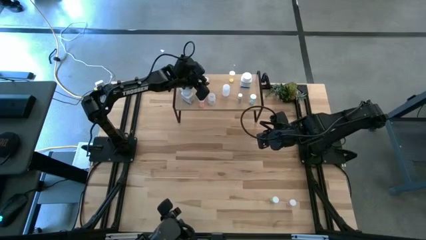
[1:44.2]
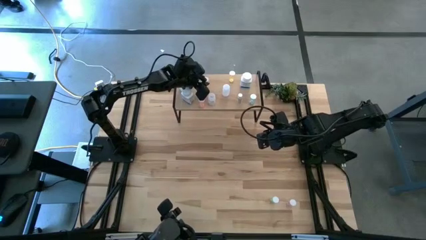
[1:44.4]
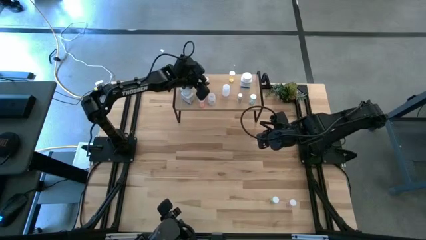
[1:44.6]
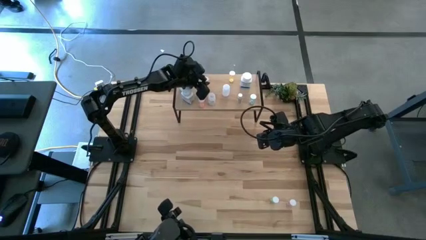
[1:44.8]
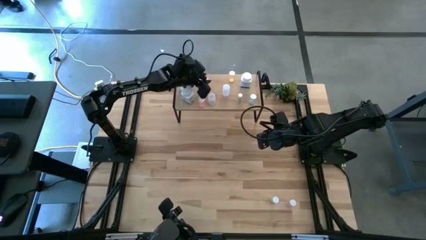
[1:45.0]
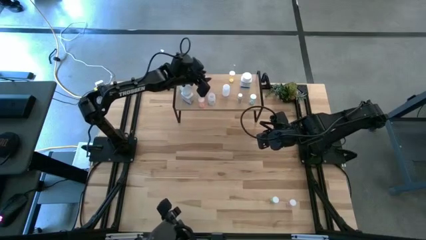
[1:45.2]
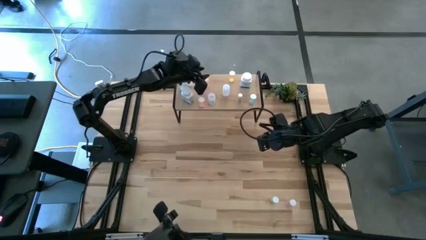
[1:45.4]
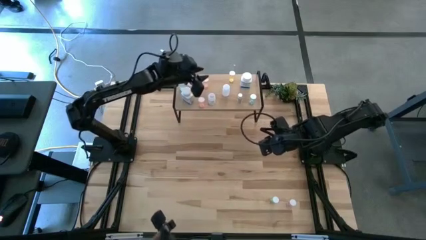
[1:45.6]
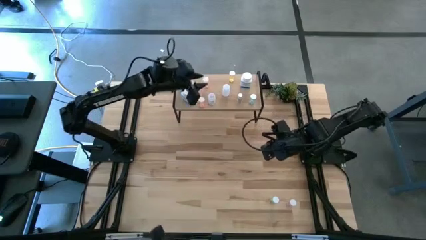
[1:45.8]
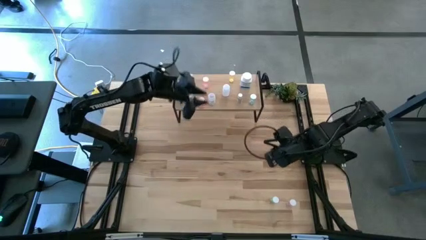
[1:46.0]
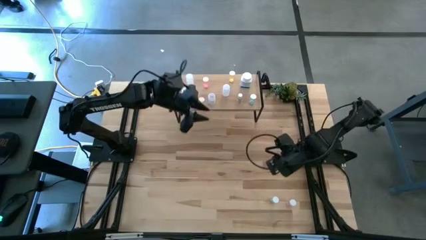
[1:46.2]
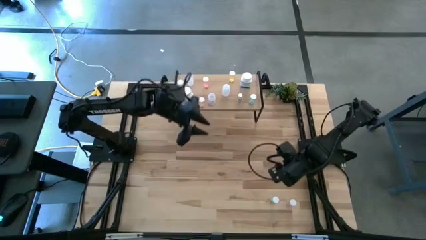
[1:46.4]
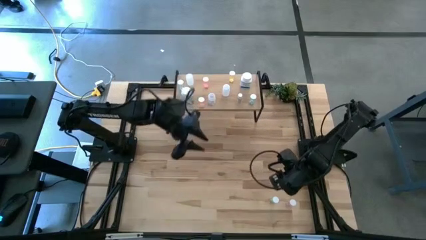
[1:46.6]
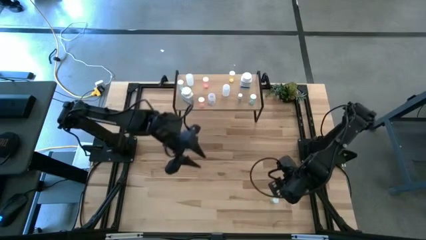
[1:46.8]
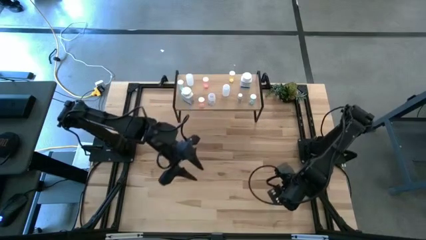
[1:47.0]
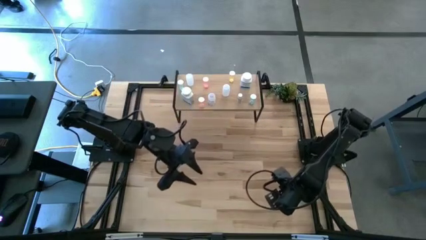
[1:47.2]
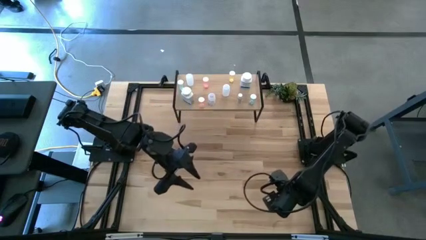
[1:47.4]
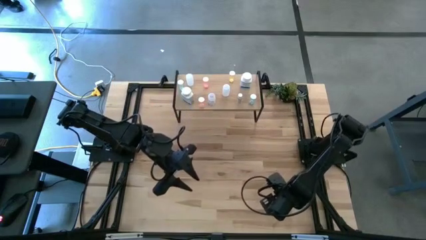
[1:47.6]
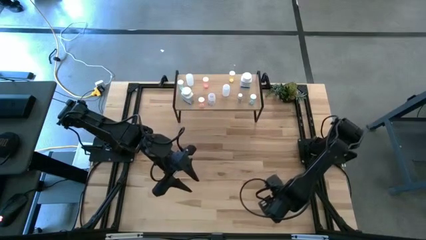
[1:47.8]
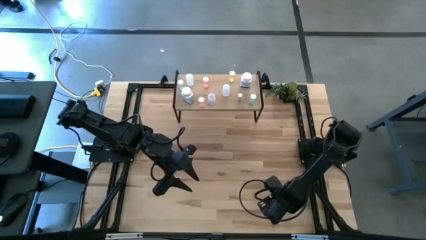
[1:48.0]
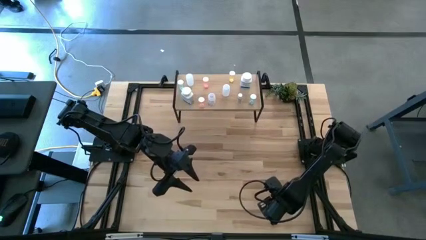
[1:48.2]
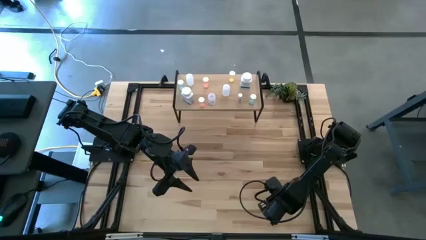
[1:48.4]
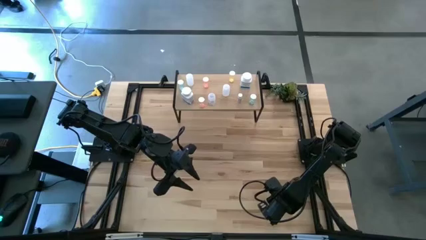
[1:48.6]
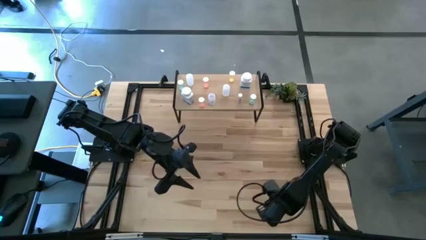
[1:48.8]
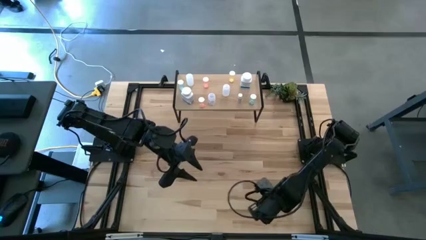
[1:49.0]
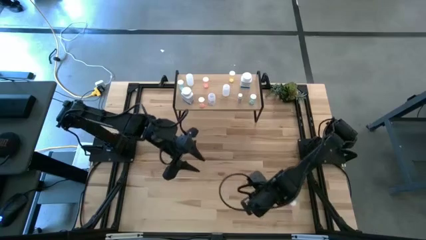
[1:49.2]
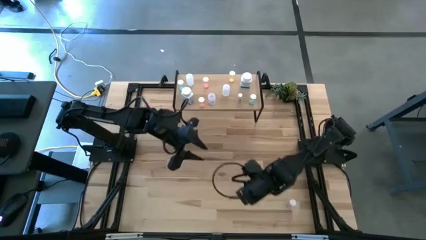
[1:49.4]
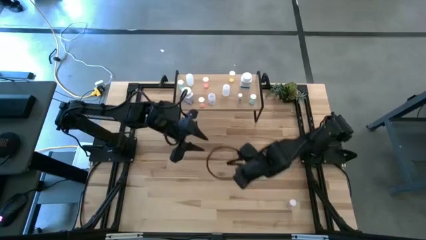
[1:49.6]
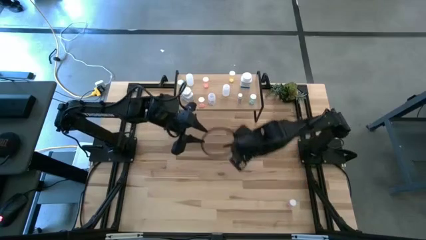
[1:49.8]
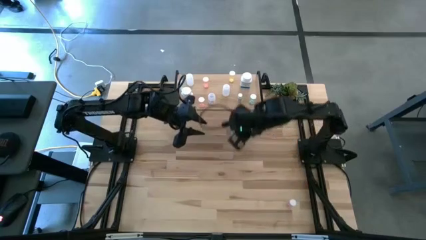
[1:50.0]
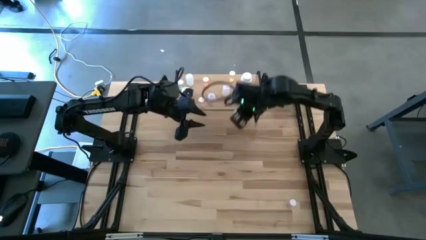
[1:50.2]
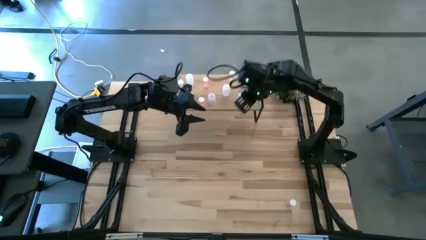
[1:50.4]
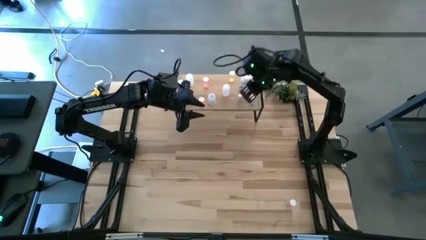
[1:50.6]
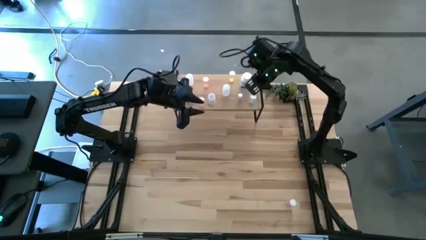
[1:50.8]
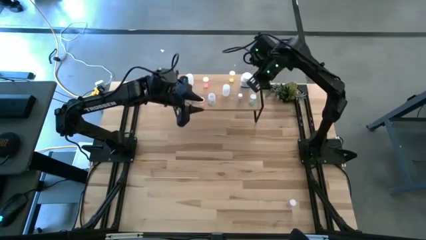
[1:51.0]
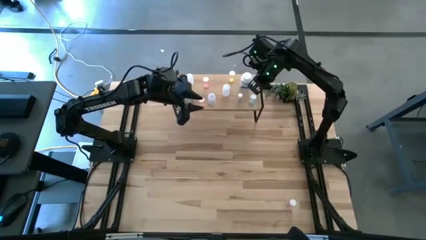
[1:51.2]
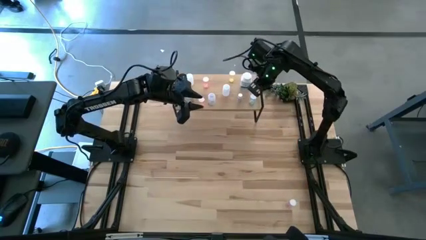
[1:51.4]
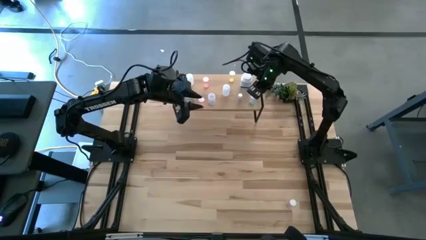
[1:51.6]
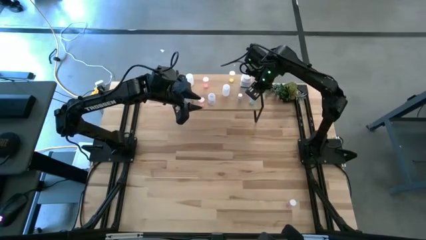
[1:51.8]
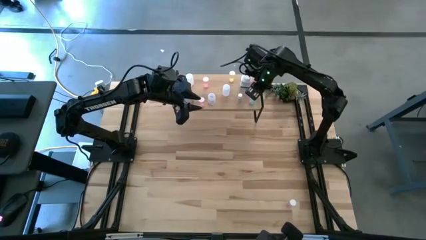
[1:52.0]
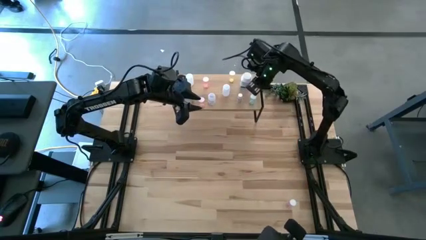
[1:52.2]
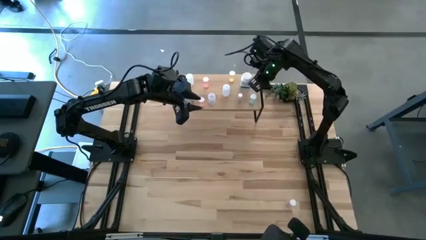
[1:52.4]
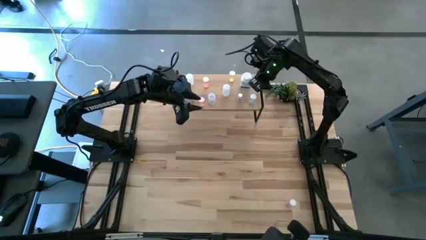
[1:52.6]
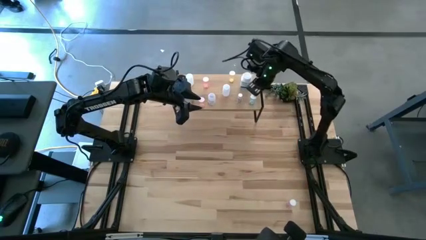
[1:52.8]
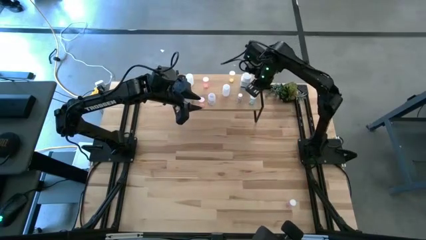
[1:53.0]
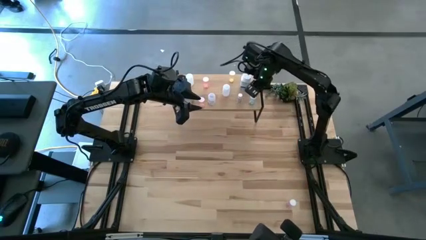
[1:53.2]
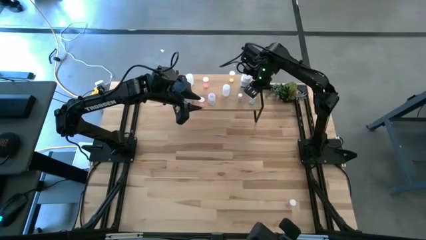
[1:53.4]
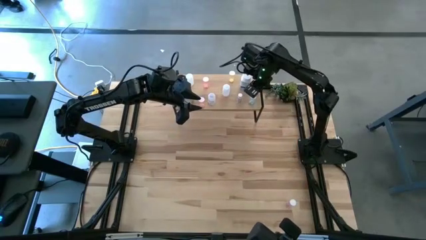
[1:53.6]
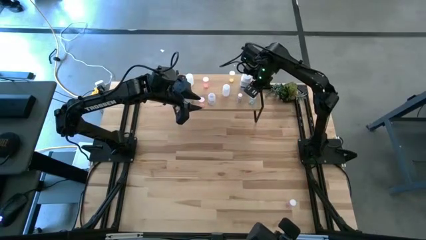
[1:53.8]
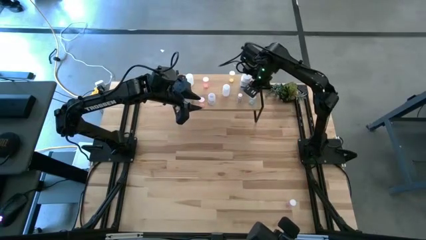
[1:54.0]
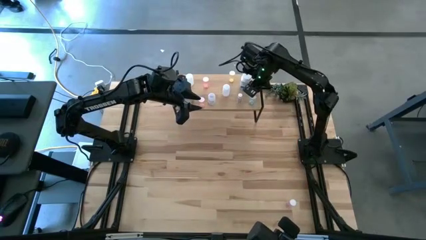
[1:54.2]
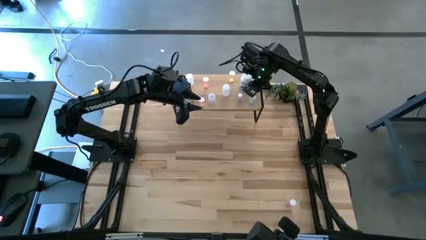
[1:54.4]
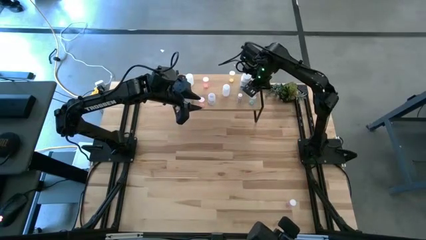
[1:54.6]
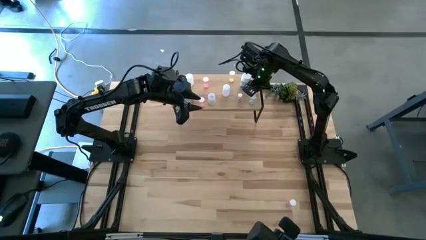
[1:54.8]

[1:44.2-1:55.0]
Task: Pick and place medicine bottles onto shelf by color
Put the green transparent pill bottle on the shelf

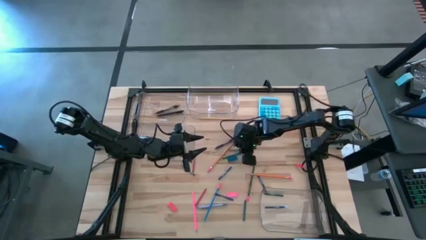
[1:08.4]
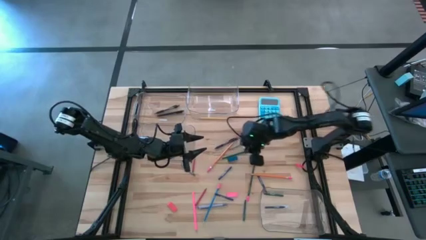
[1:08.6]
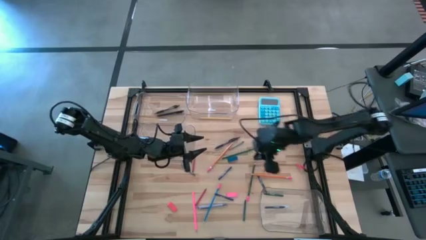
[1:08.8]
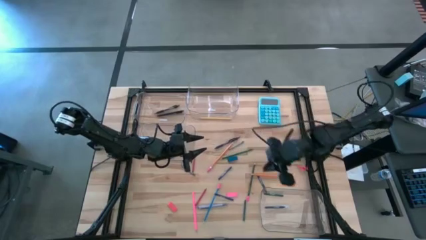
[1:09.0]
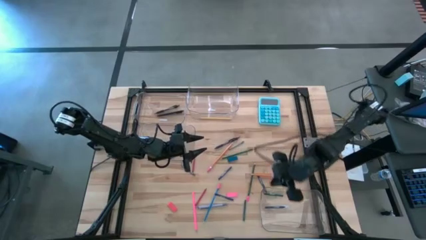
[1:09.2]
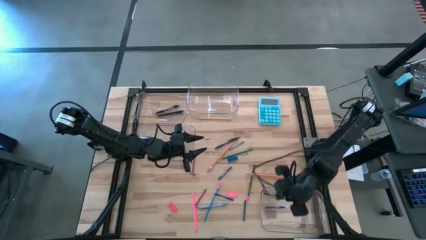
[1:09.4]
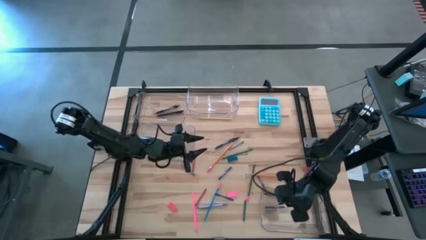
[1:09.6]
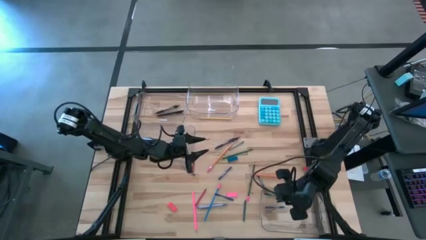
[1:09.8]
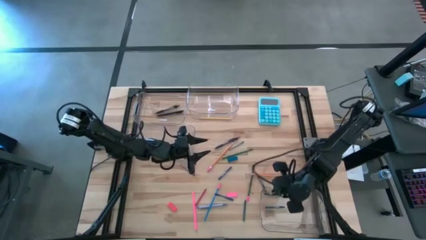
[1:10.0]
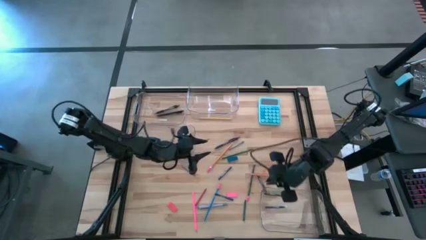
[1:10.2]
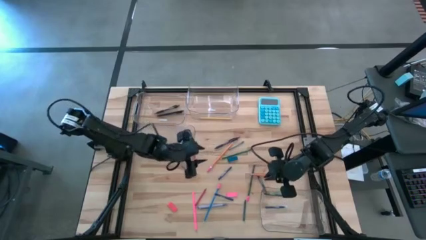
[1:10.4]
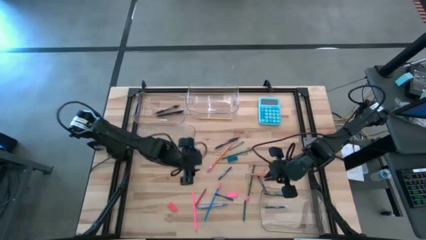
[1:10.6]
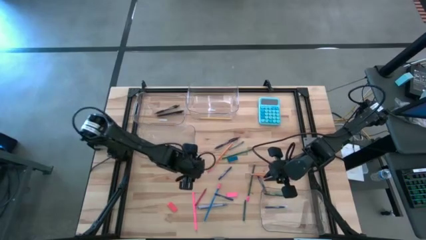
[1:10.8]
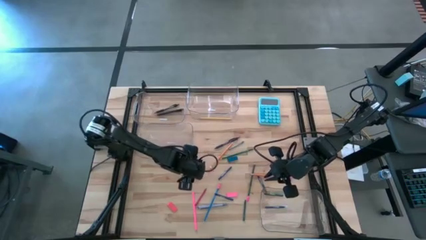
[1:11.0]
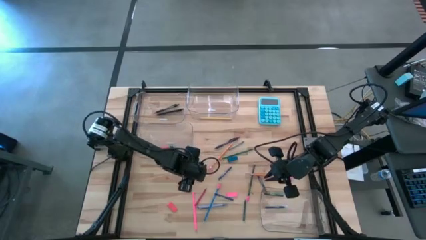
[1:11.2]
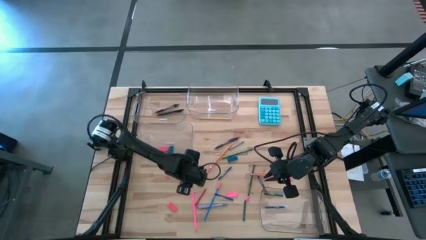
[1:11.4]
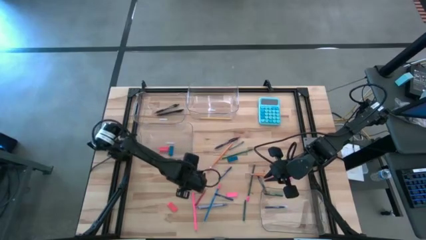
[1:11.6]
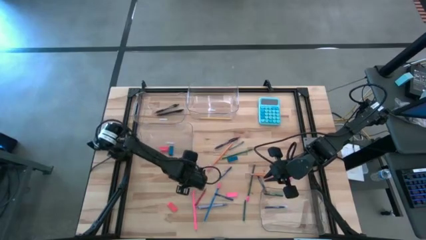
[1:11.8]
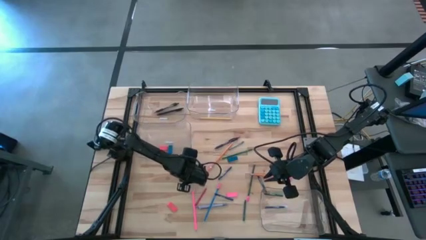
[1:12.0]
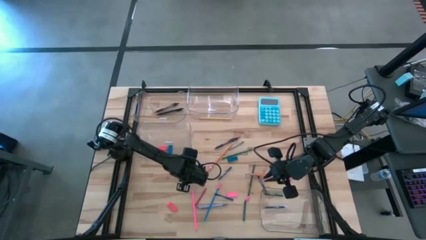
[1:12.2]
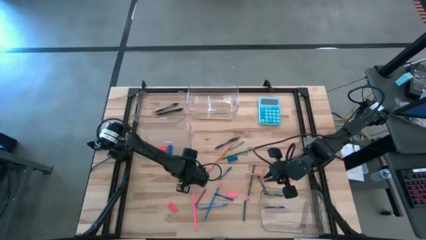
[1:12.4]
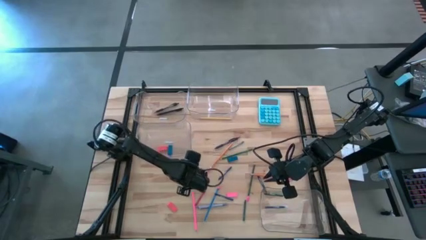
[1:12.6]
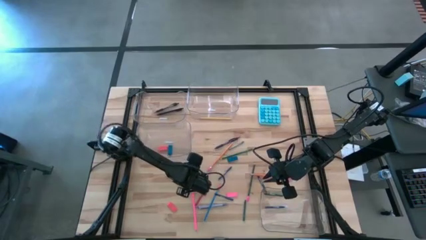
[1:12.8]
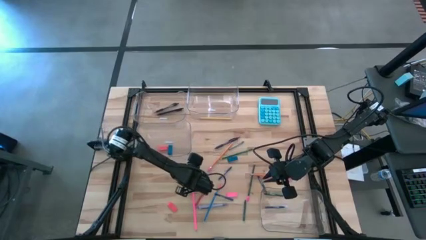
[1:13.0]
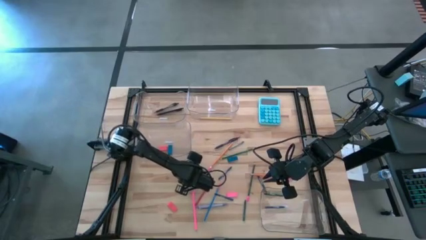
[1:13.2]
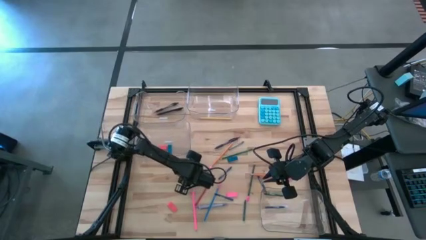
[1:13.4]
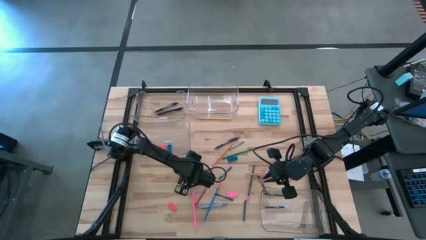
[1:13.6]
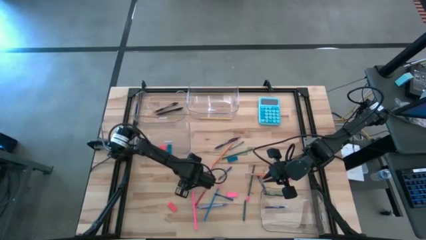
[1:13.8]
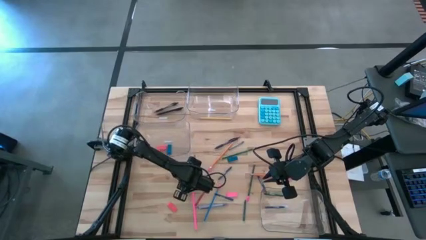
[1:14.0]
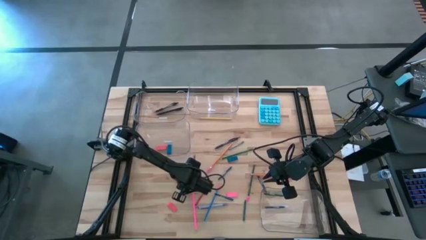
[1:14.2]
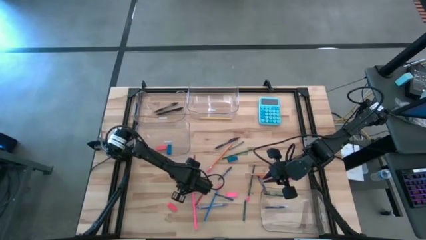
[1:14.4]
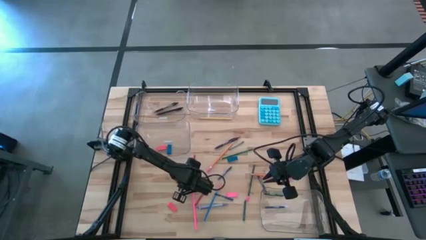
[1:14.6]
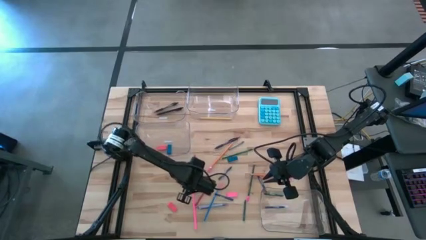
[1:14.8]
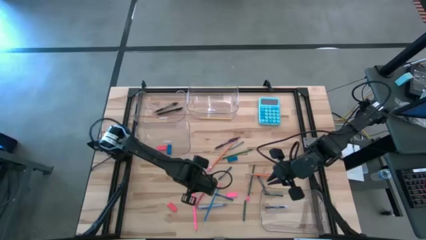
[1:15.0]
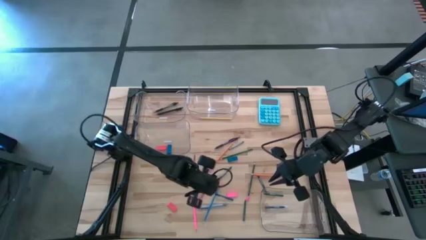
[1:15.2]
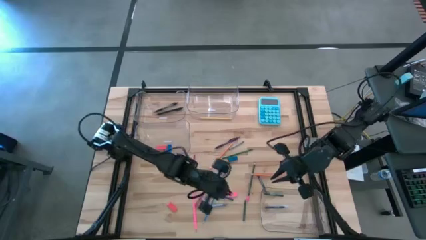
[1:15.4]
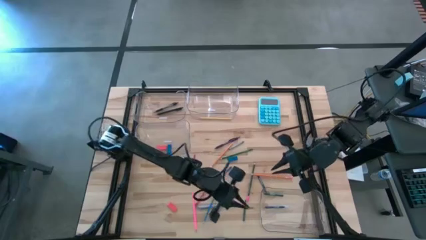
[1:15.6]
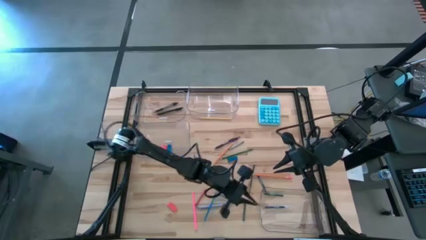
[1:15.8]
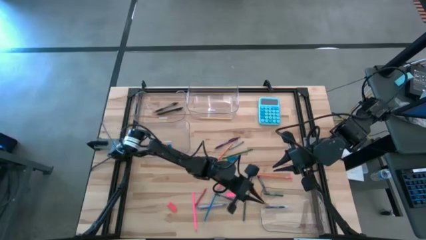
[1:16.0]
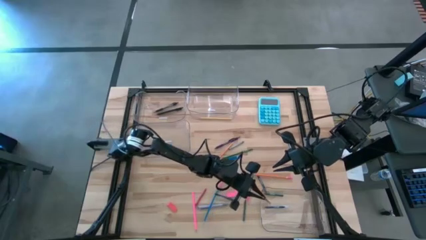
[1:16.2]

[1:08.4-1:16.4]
Task: Sort crayons/erasers/pens/pencils in bins
Put the gray crayon into the bottom right transparent bin
